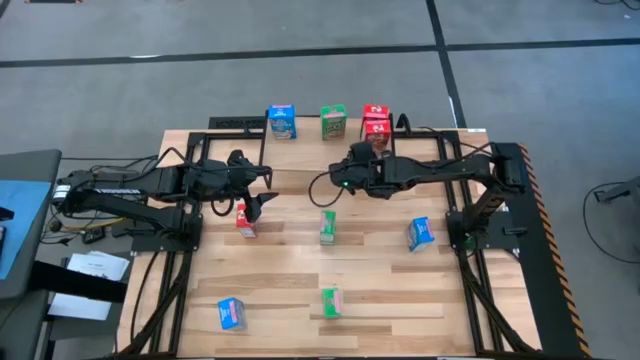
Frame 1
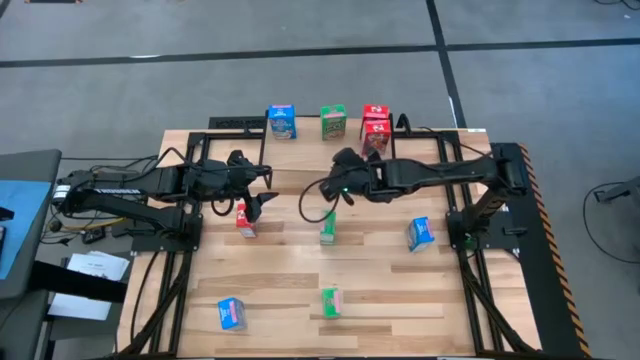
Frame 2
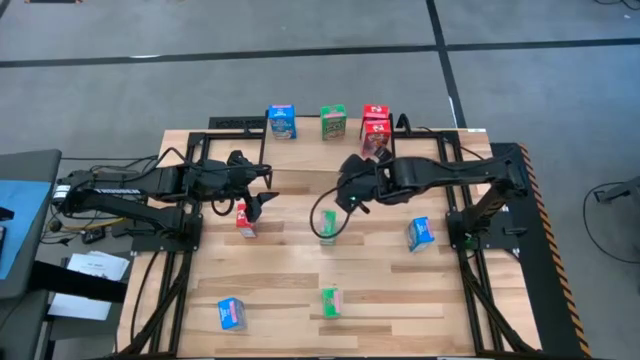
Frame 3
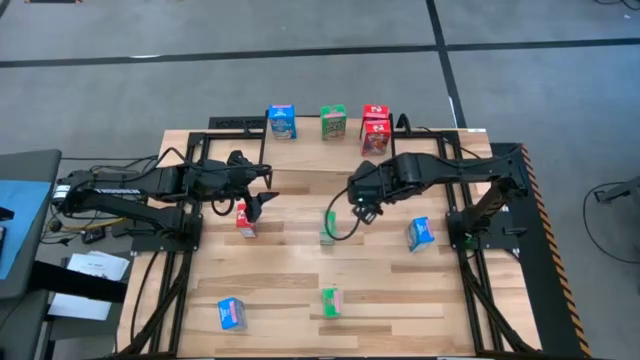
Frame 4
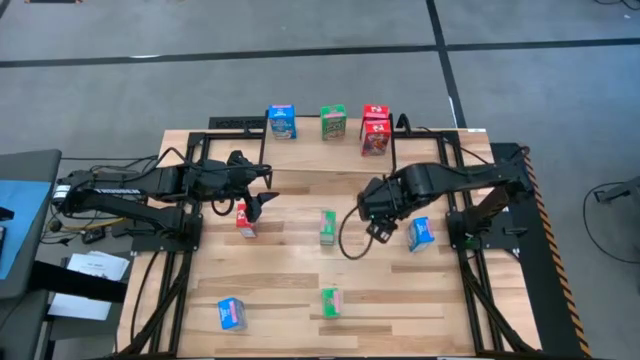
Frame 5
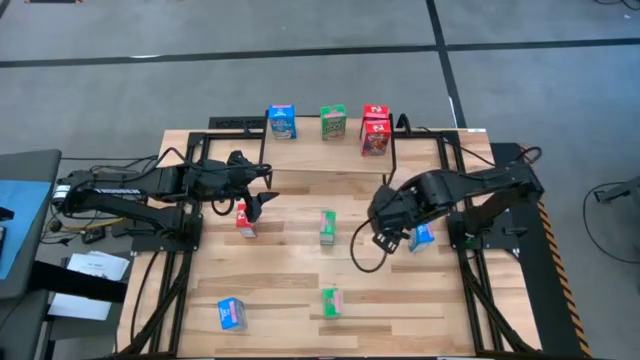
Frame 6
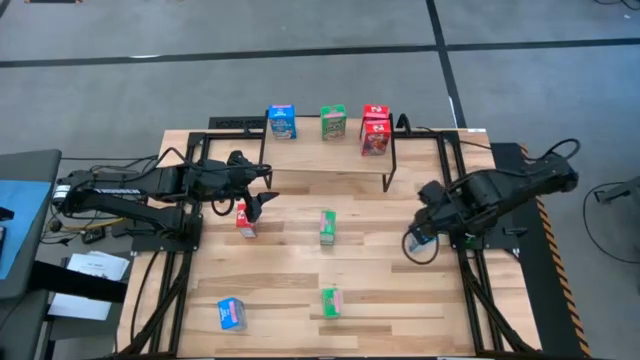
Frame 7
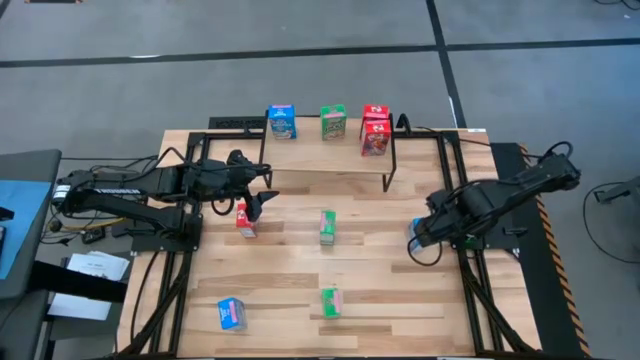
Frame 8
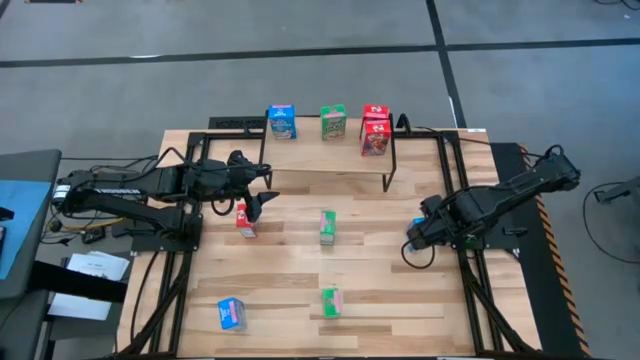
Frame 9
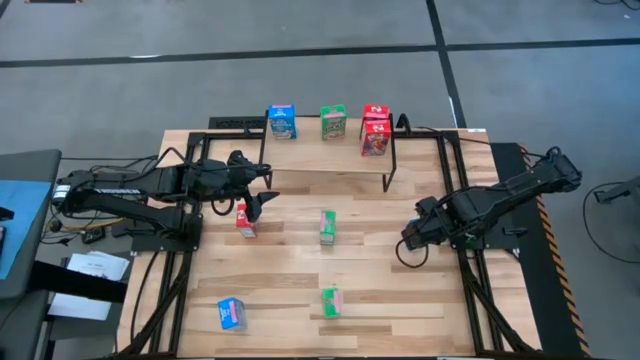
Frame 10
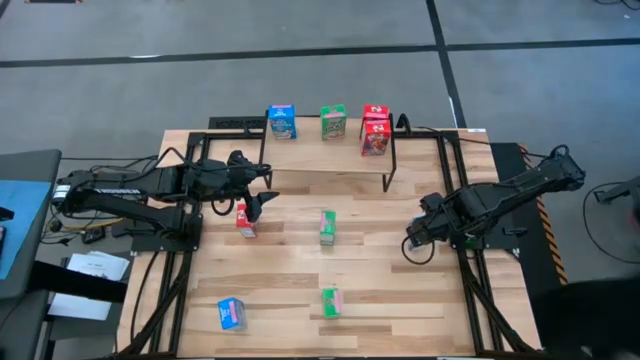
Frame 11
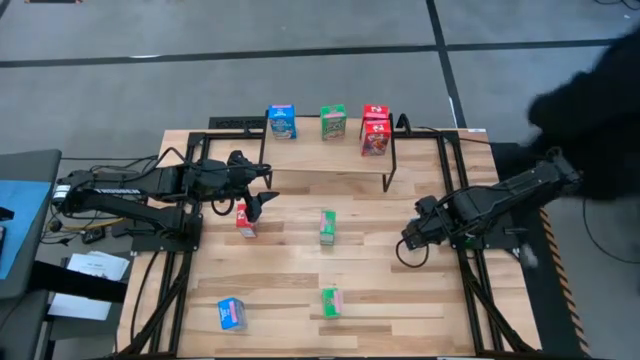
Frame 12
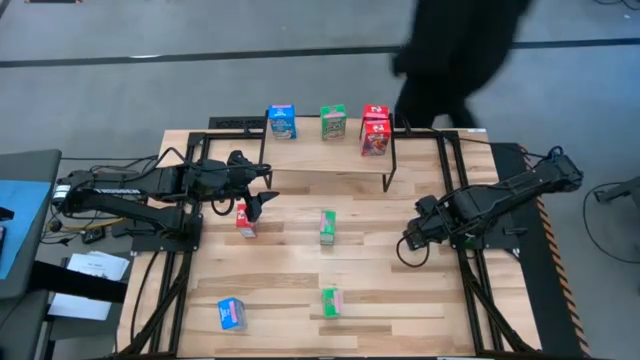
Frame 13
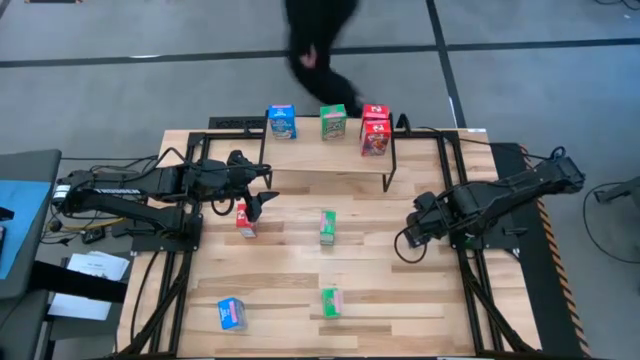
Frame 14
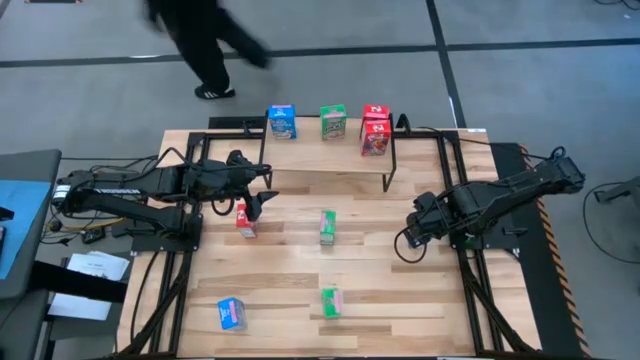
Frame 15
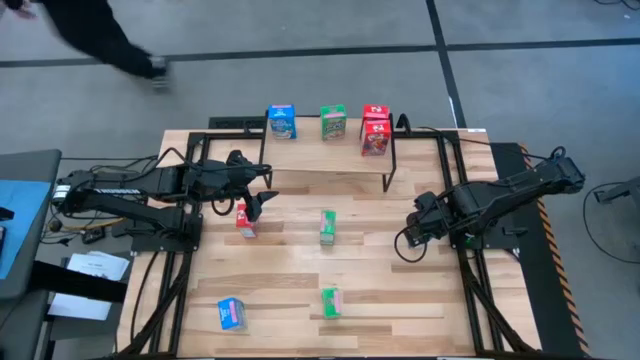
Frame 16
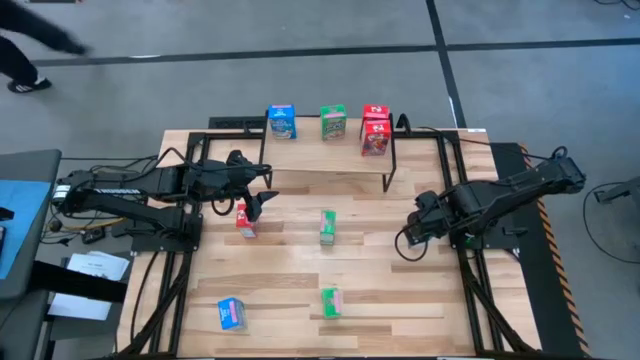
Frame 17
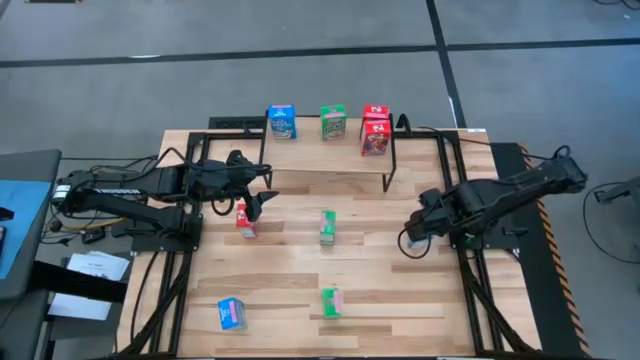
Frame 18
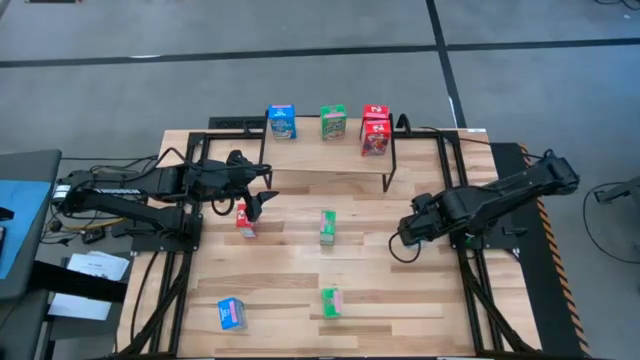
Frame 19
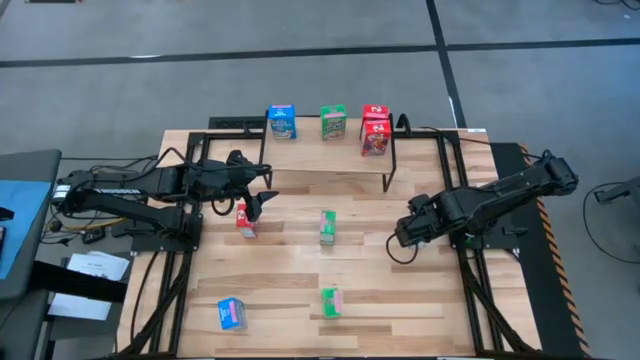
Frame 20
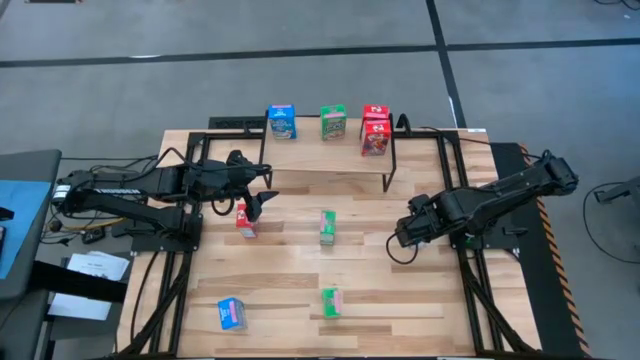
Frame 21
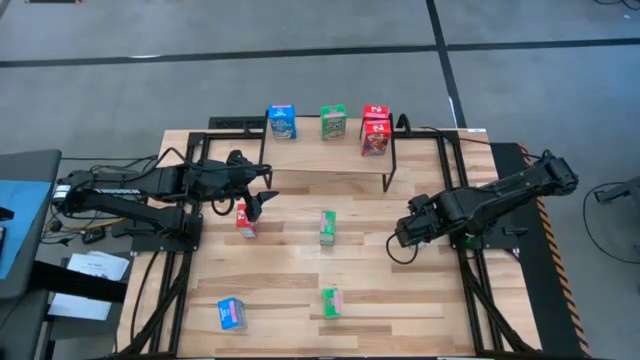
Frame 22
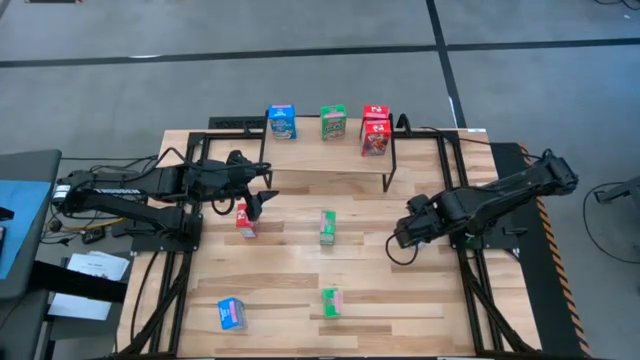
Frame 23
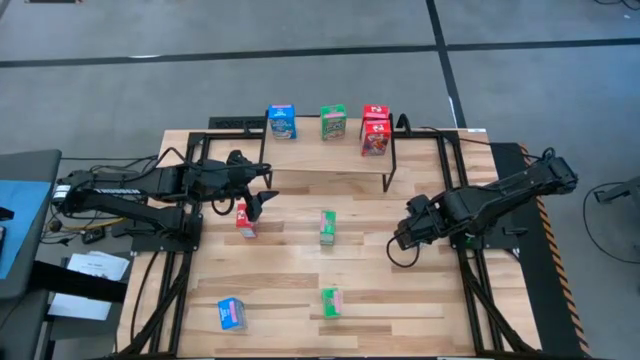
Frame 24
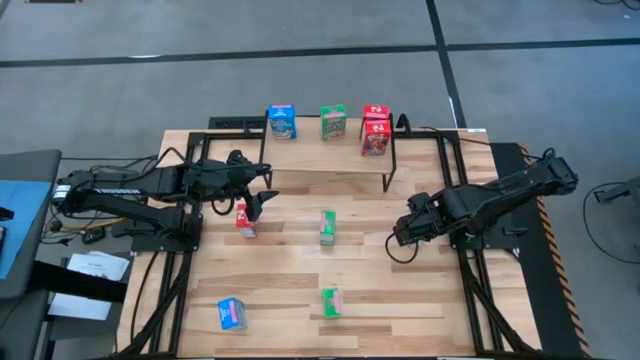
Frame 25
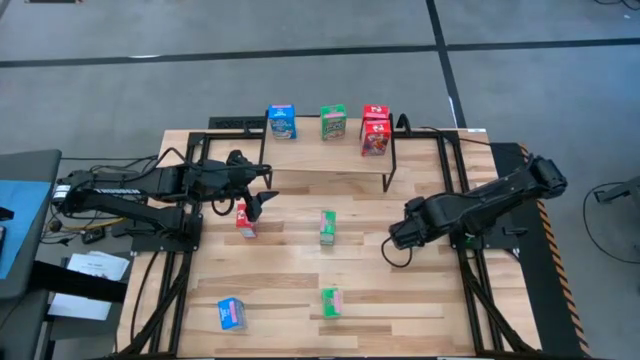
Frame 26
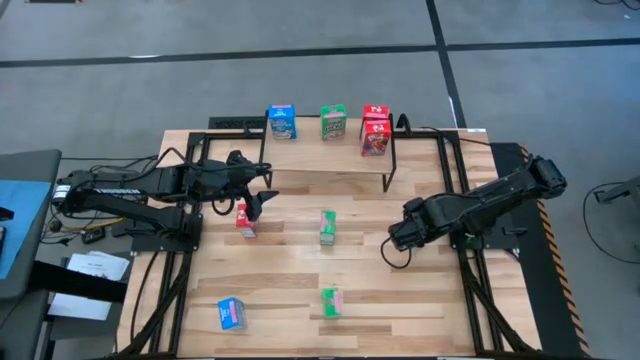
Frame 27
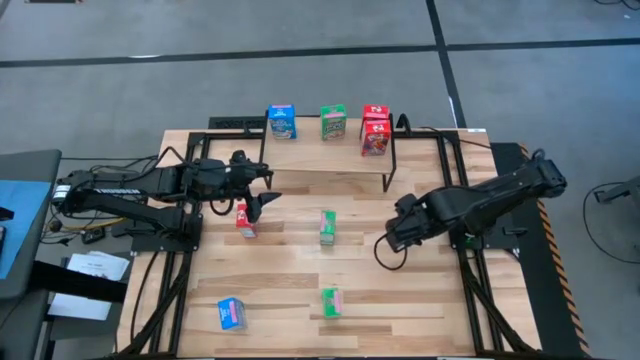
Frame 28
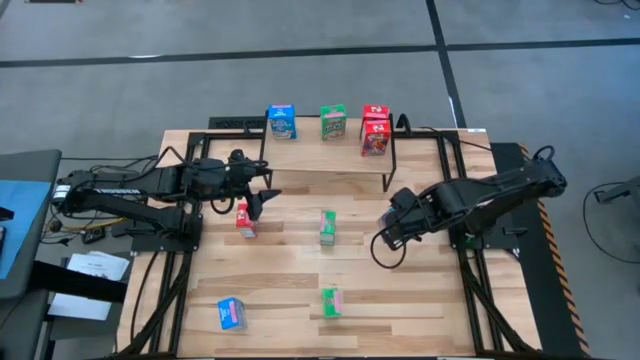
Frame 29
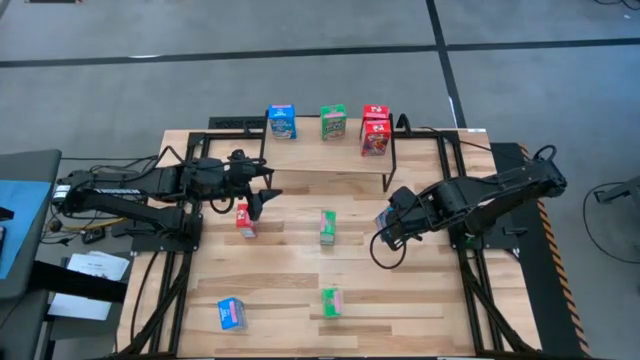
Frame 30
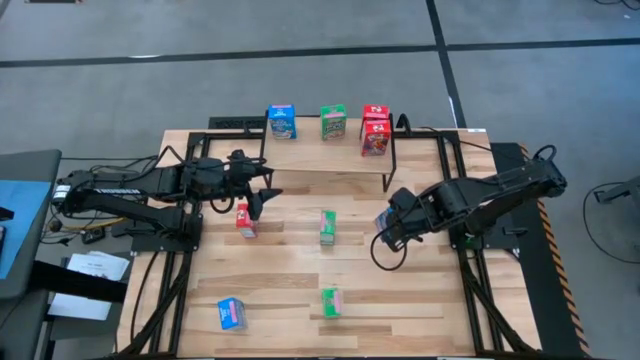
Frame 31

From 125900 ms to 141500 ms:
Task: Stack cereal on shelf
Put the top blue cereal box on the shelf aligned with the other blue cereal box

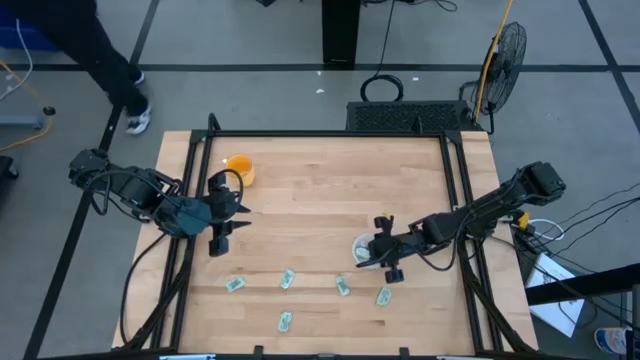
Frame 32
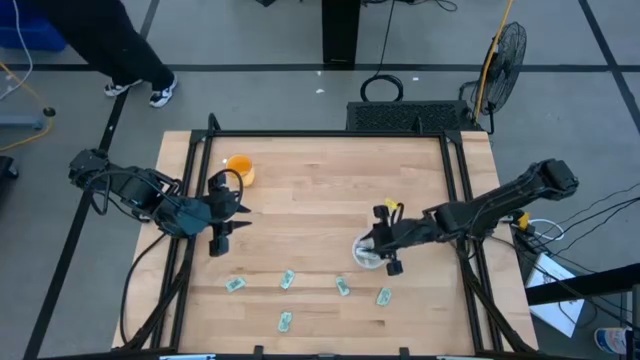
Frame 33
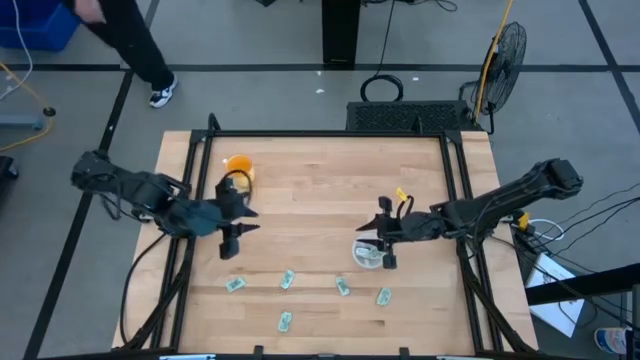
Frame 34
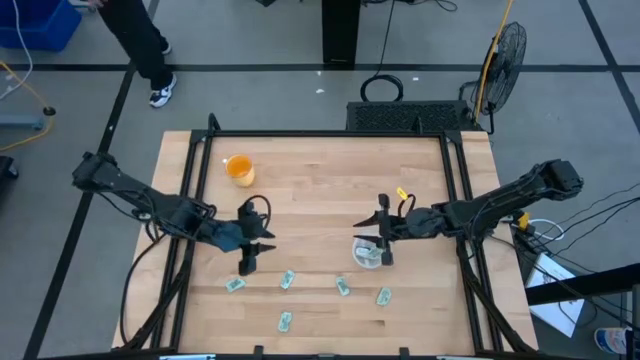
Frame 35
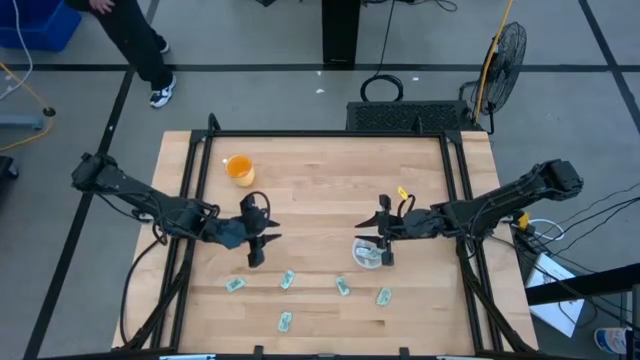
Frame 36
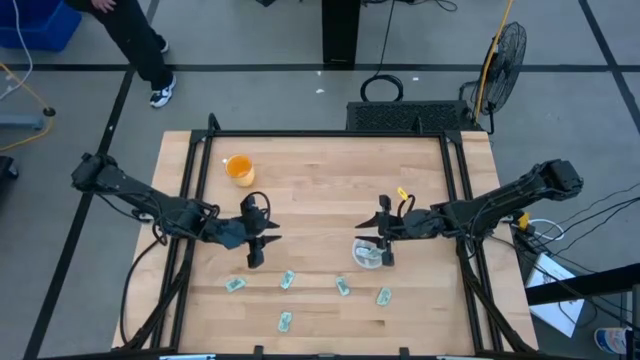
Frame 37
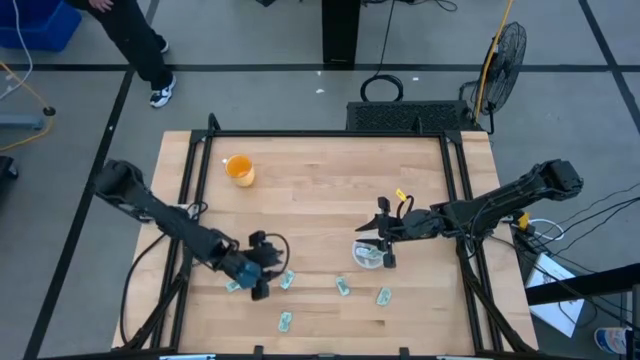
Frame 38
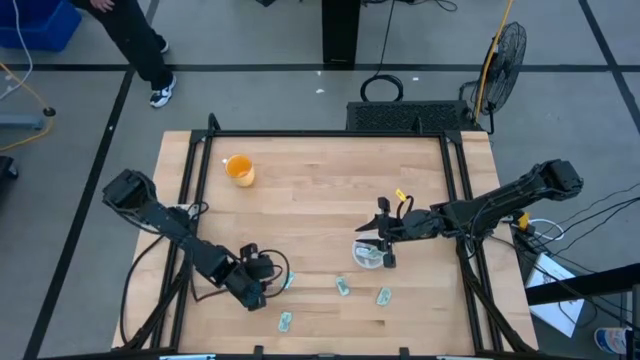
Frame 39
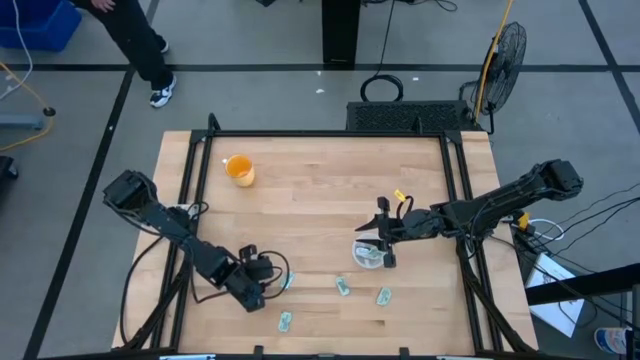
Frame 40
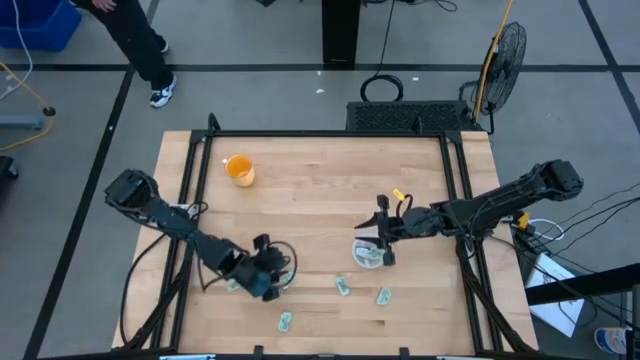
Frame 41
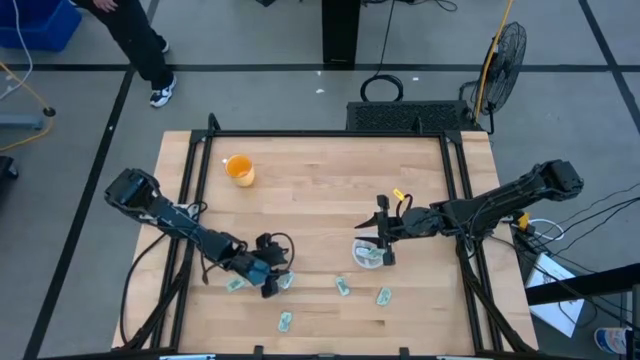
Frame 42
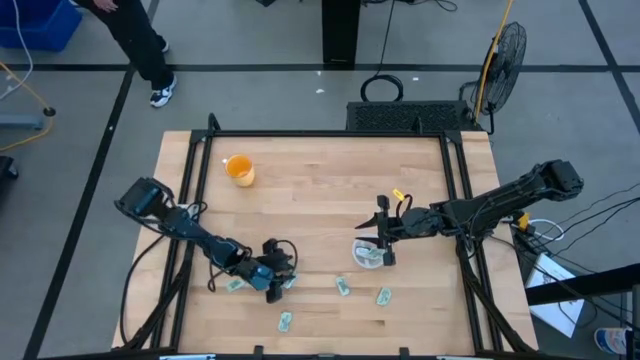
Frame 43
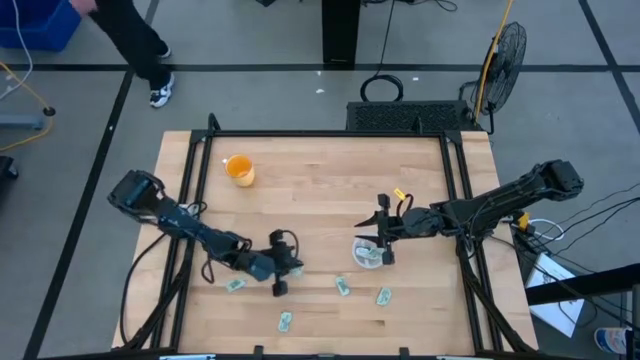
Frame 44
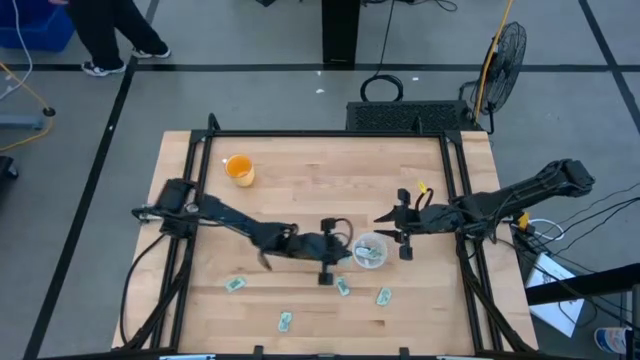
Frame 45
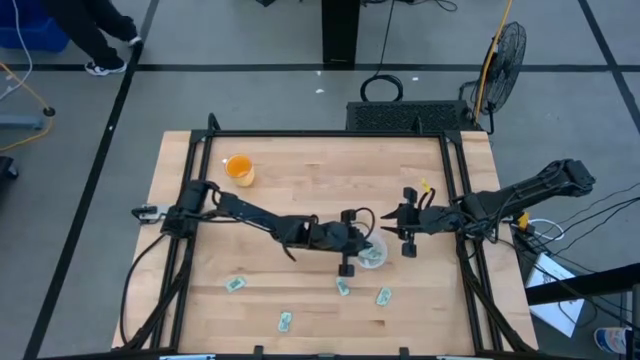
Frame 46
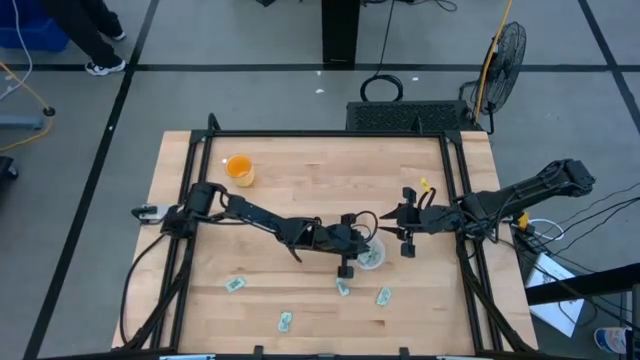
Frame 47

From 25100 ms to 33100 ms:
Task: Pick and place Stevia / Truvia into bins
Put the stevia packet into the transparent container
